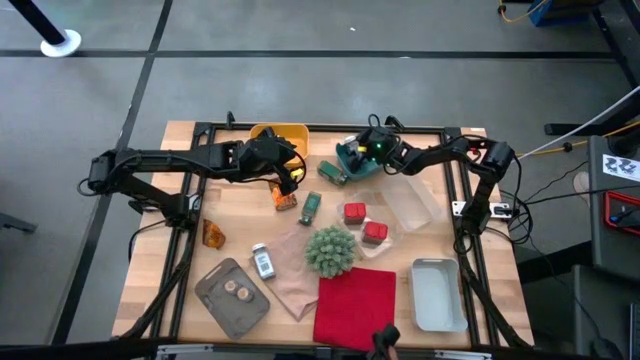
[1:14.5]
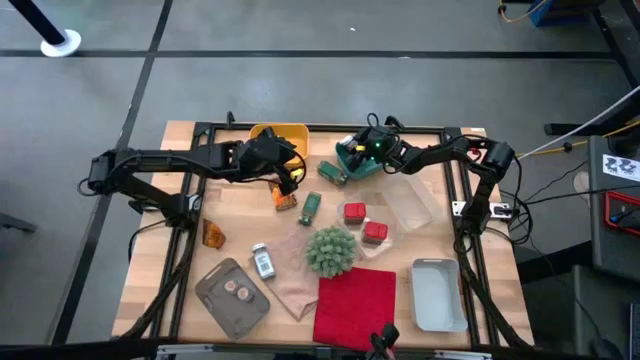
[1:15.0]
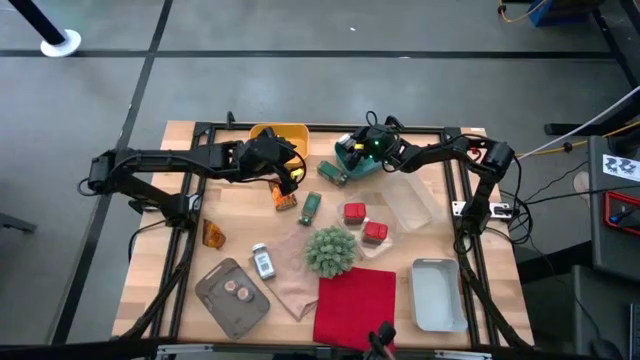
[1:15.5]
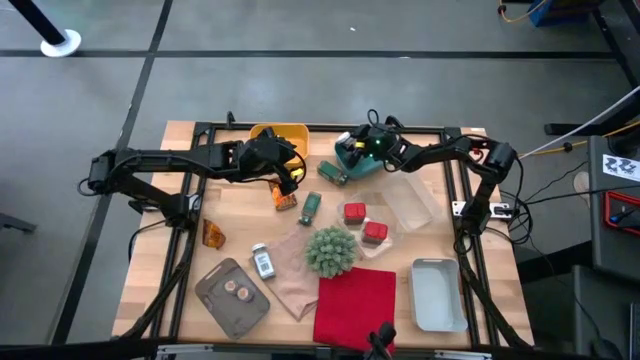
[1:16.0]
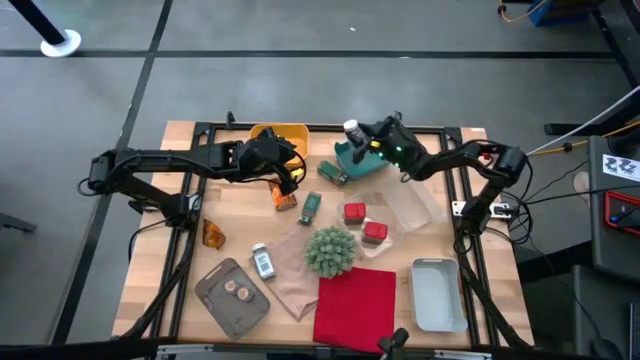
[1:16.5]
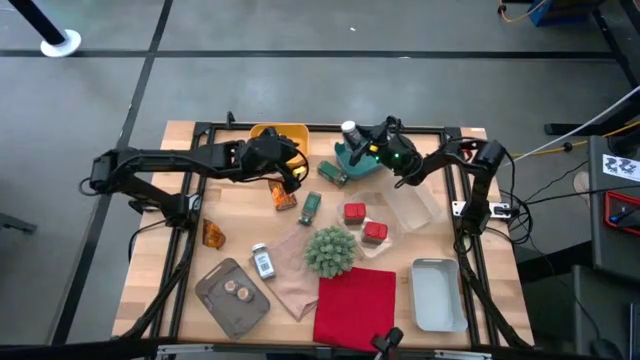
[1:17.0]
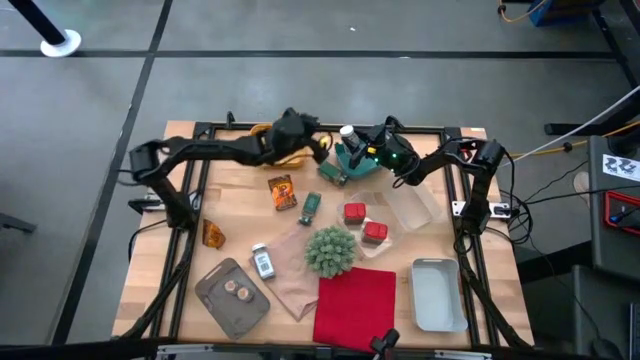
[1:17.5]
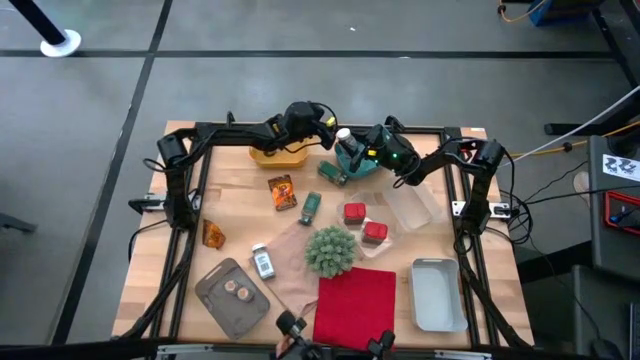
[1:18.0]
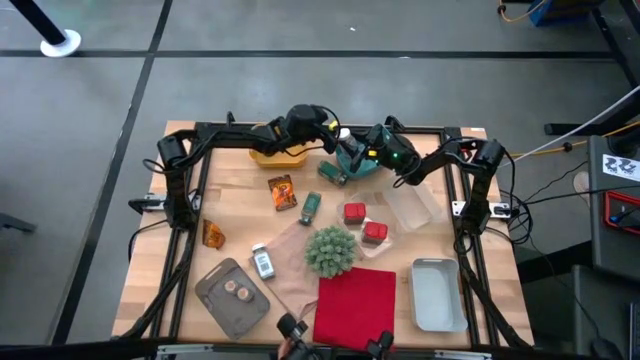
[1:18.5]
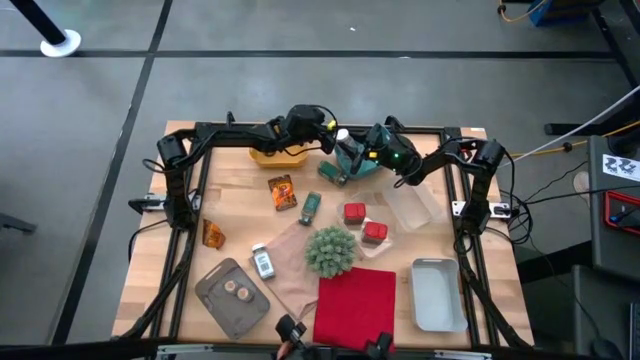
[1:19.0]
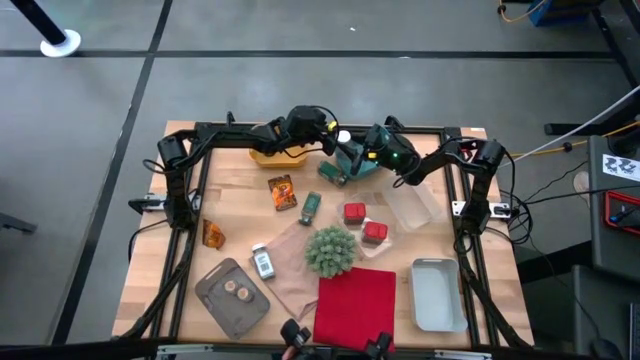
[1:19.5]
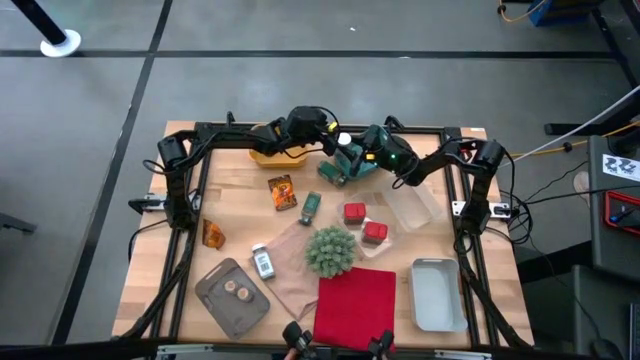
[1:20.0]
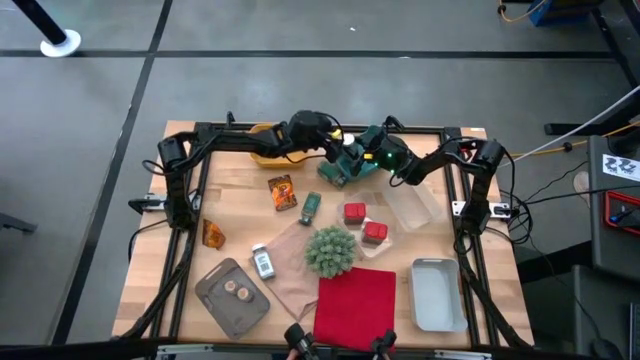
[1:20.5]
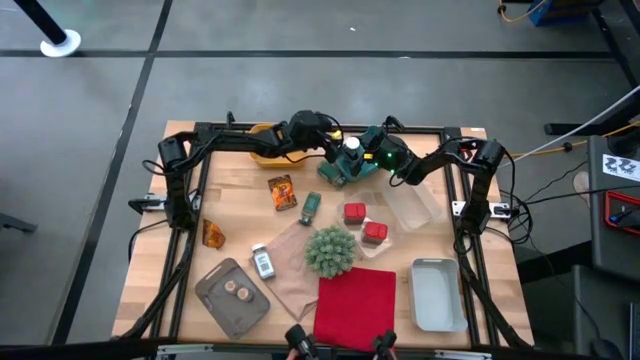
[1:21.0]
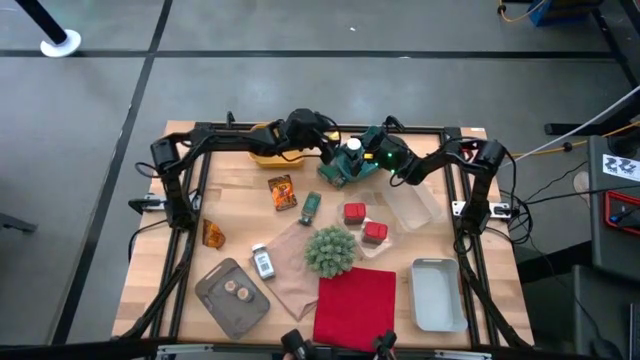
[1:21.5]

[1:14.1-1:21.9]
Task: Sort spices by type
Put the right white seasoning bottle into the green bin

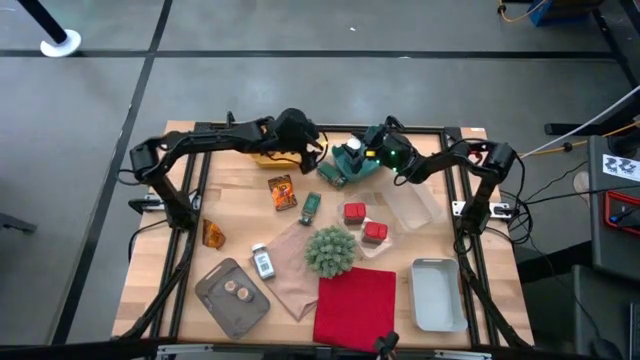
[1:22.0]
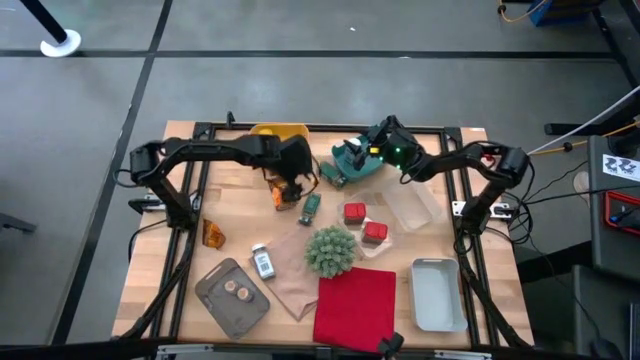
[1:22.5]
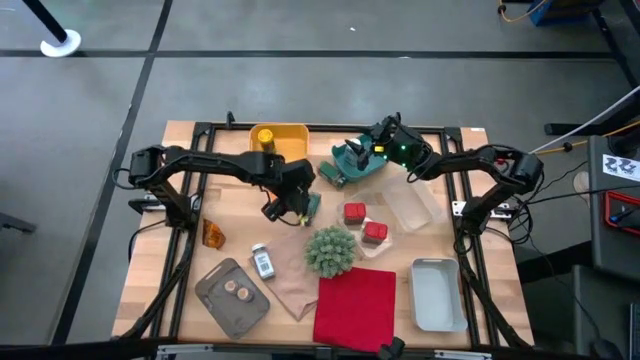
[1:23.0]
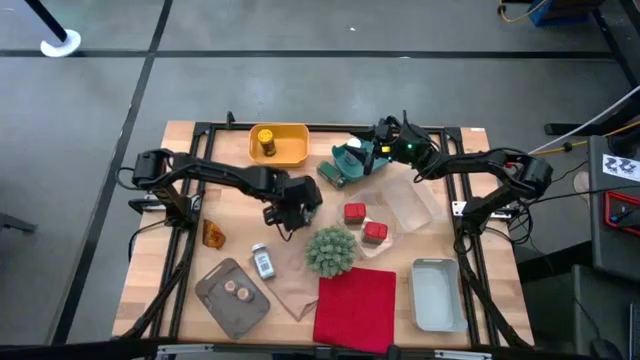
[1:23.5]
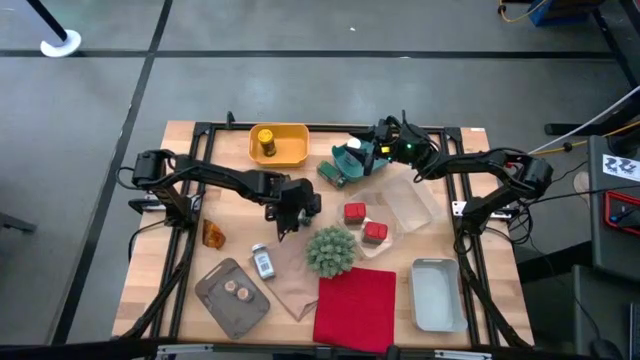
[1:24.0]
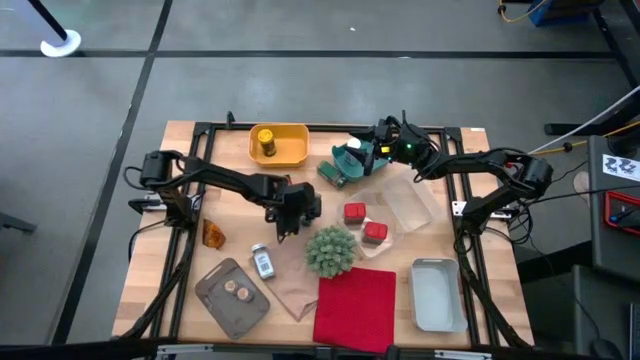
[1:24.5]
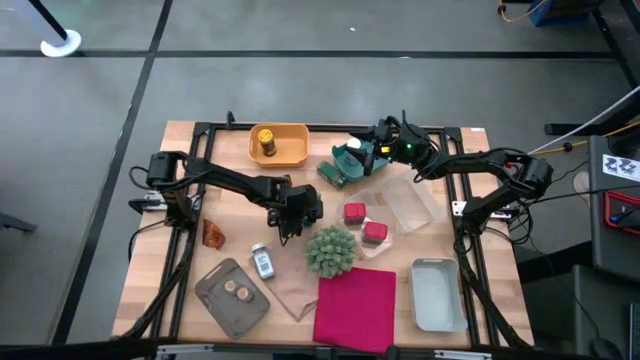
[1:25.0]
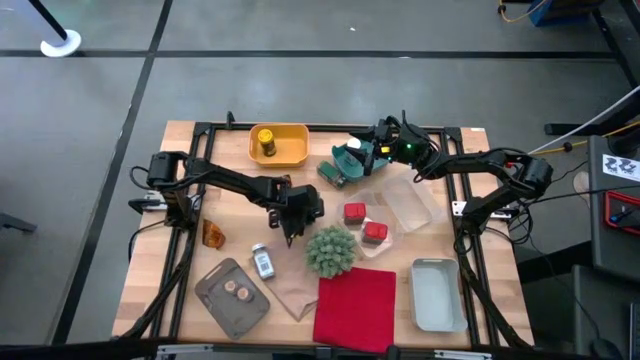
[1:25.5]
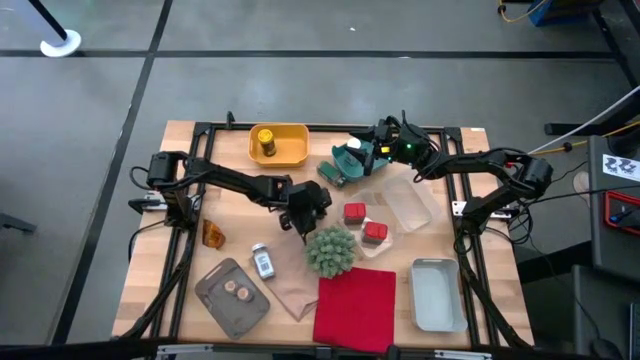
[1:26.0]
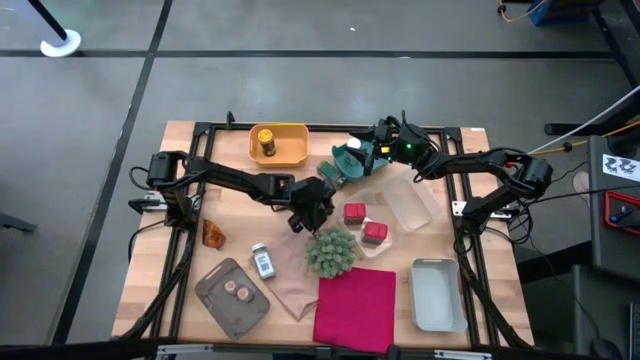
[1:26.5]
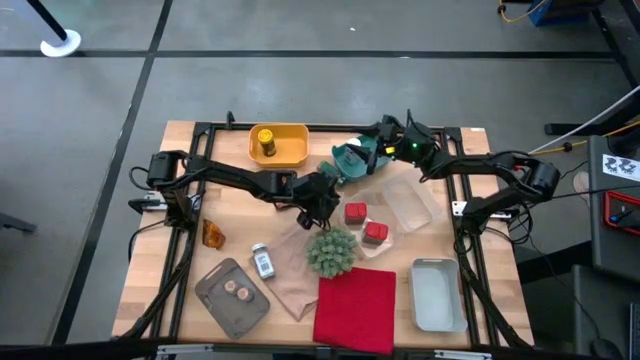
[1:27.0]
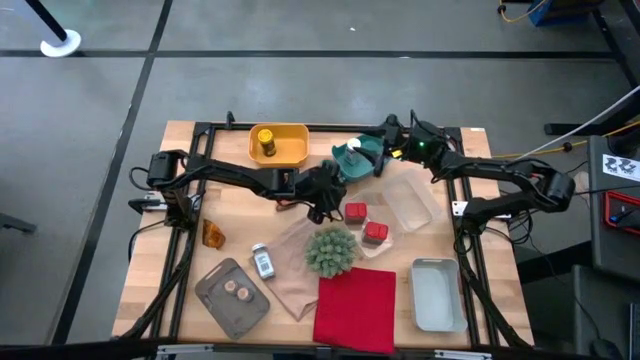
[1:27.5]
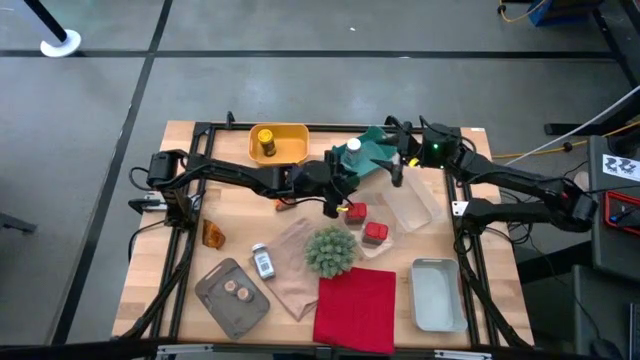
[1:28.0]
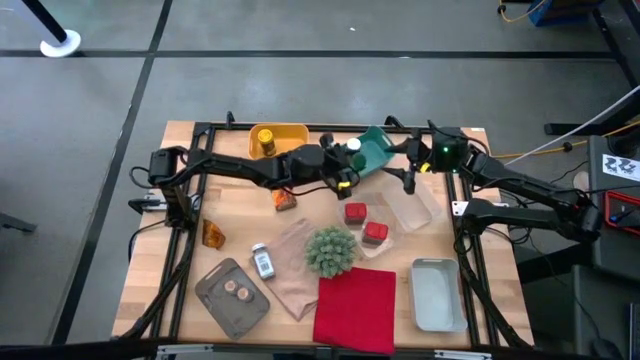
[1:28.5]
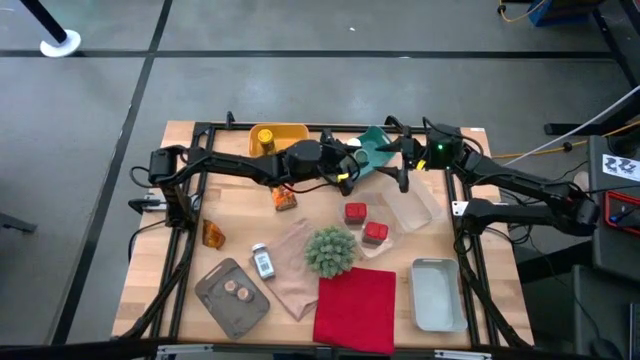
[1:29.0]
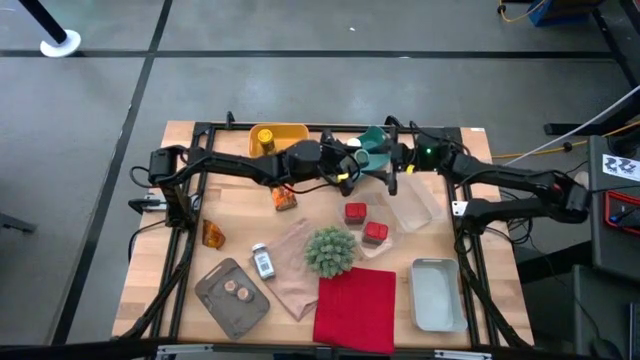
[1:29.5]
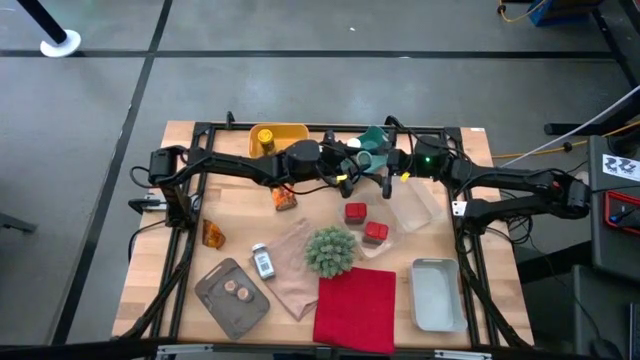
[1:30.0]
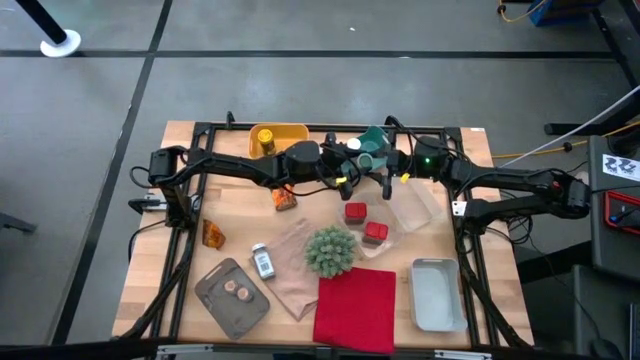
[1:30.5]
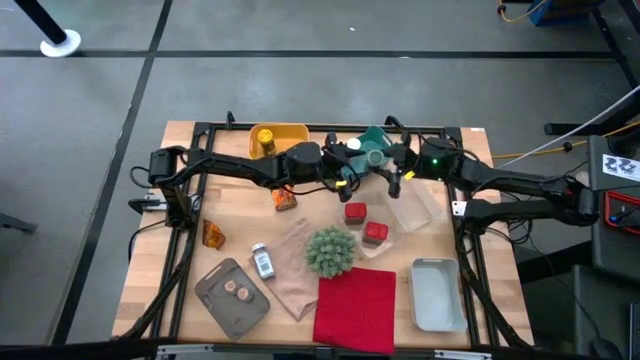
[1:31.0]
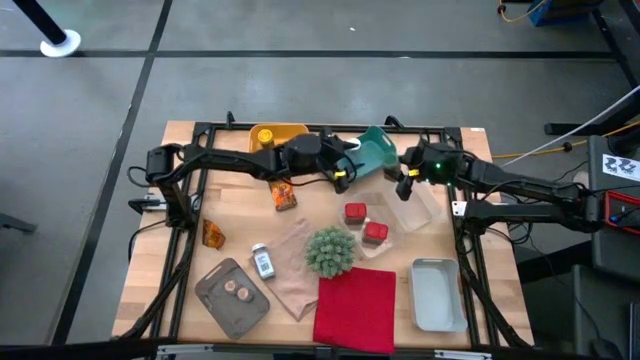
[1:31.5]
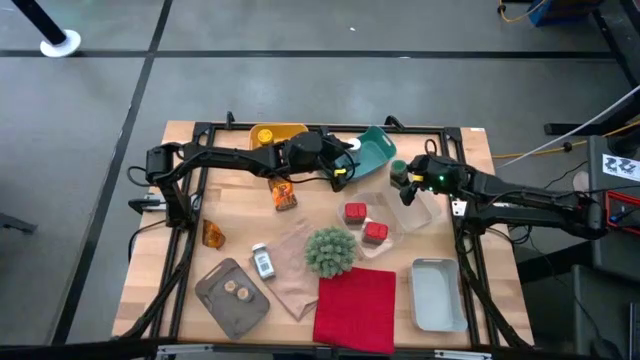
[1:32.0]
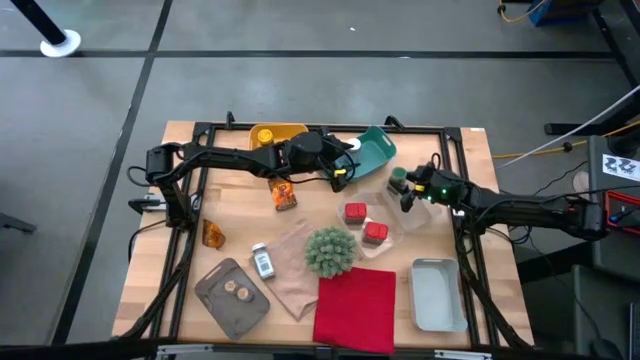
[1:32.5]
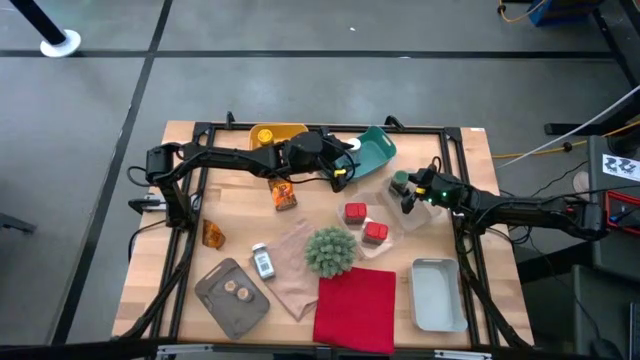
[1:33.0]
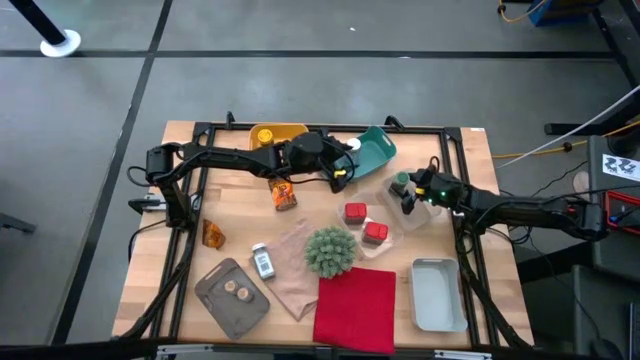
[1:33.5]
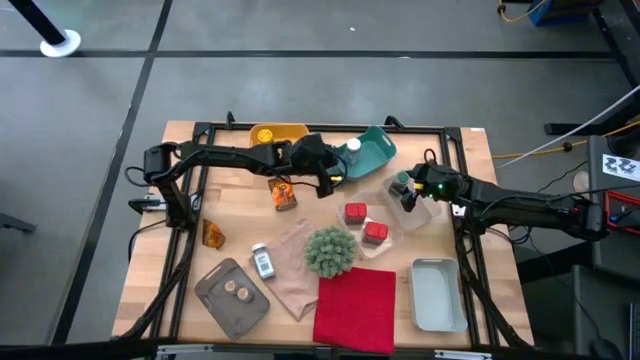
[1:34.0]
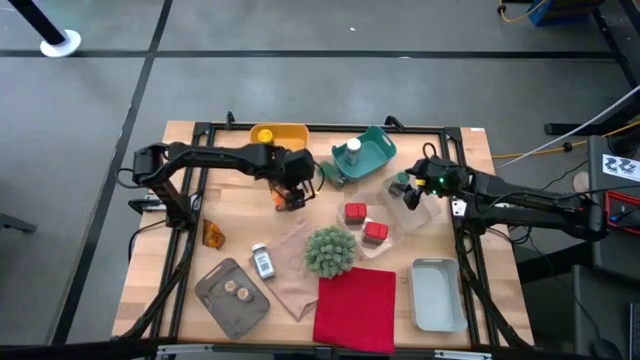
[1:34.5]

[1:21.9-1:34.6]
Put the bottom green seasoning bottle into the right transparent bin

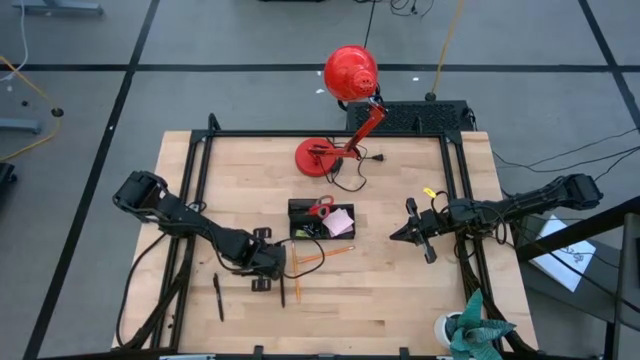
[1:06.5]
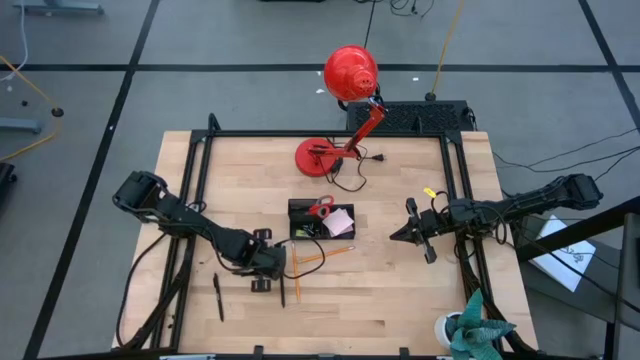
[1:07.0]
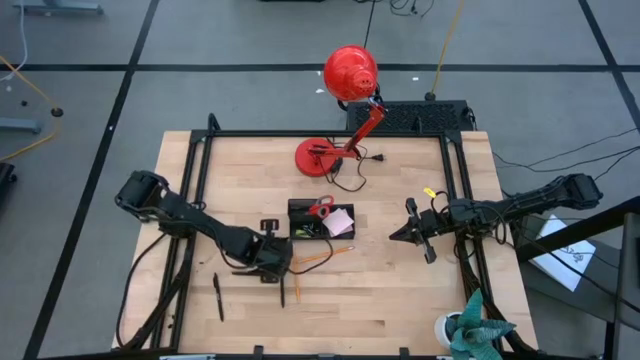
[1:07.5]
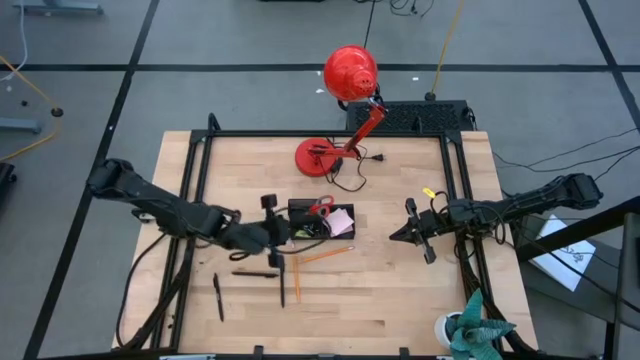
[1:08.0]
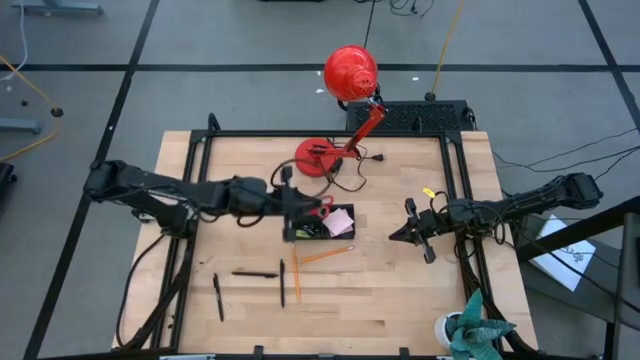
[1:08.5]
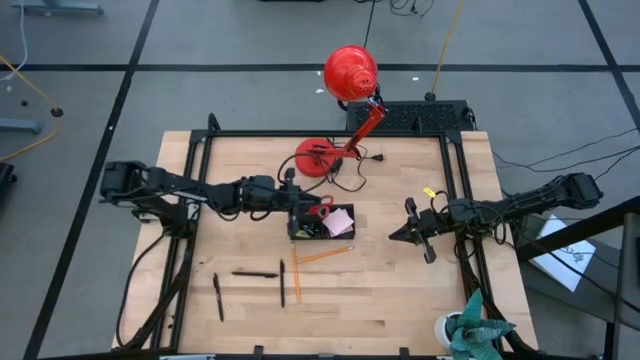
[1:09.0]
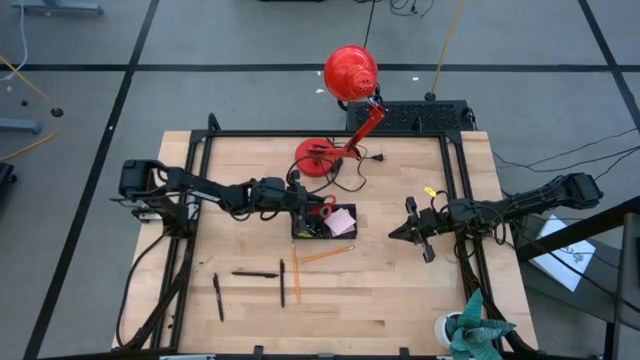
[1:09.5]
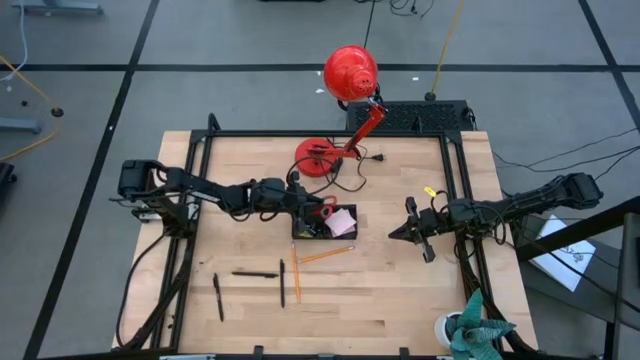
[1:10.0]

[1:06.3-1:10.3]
Task: Pick and place office supplies into organizer
Put the black pen into the desk organizer
